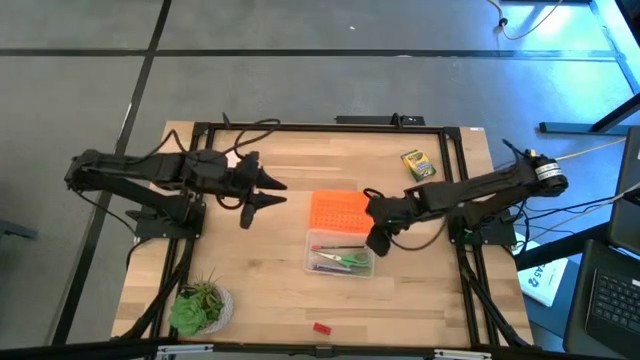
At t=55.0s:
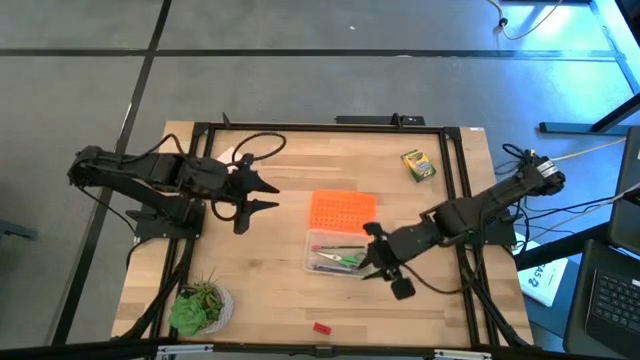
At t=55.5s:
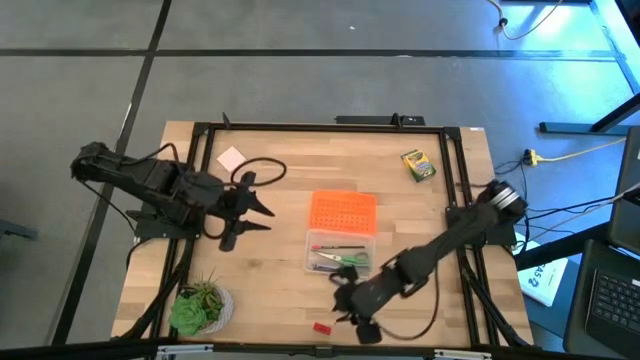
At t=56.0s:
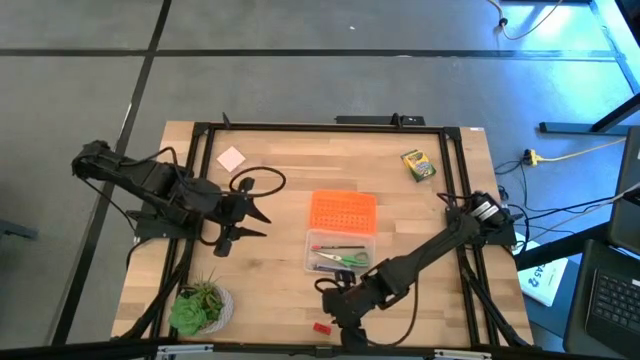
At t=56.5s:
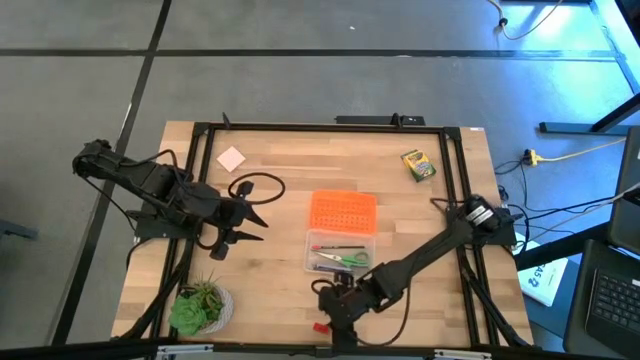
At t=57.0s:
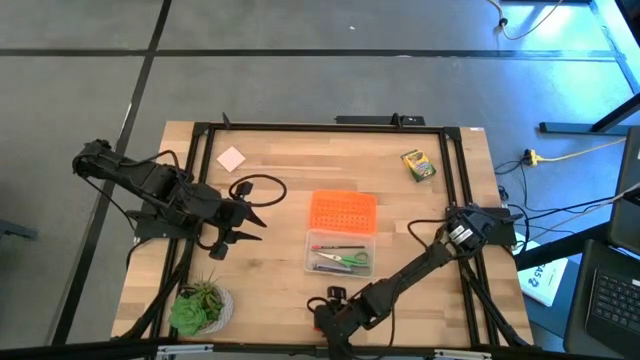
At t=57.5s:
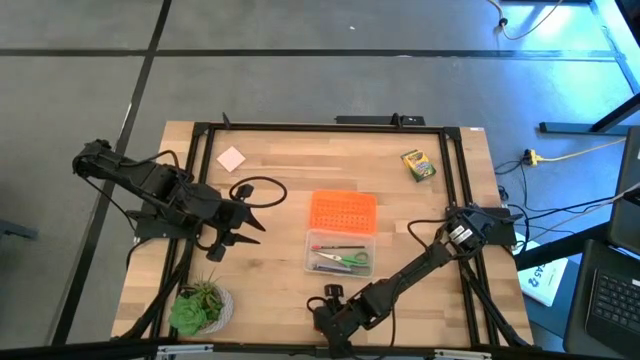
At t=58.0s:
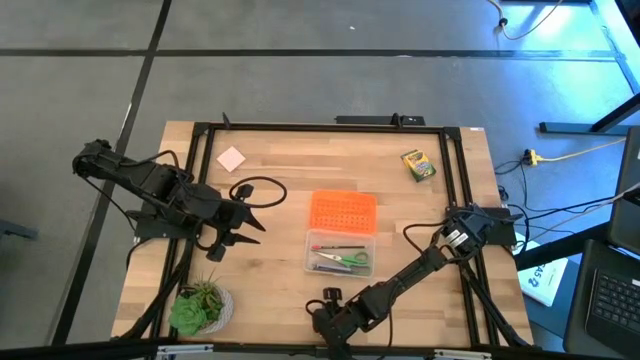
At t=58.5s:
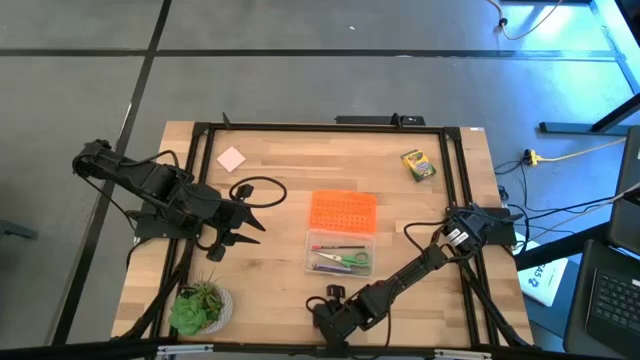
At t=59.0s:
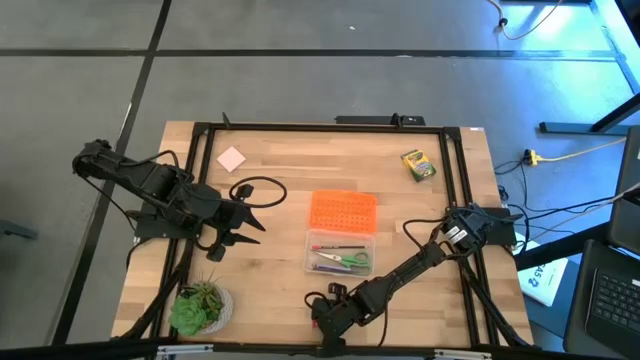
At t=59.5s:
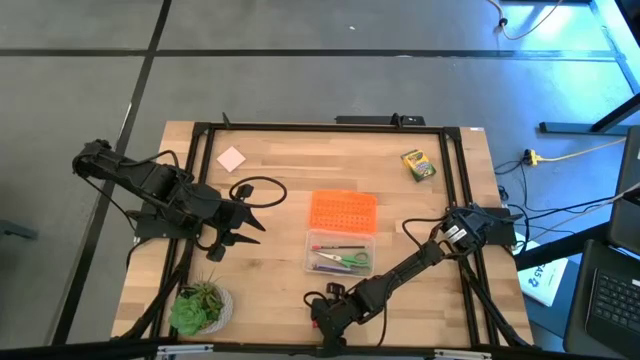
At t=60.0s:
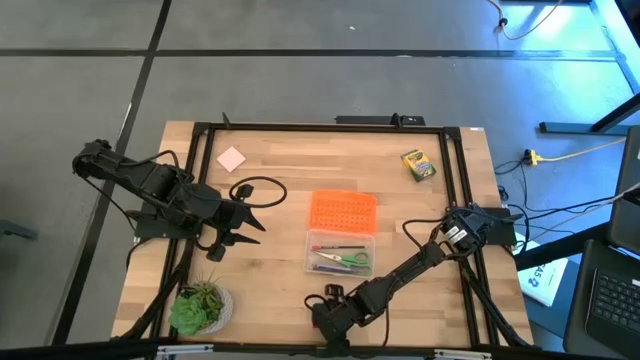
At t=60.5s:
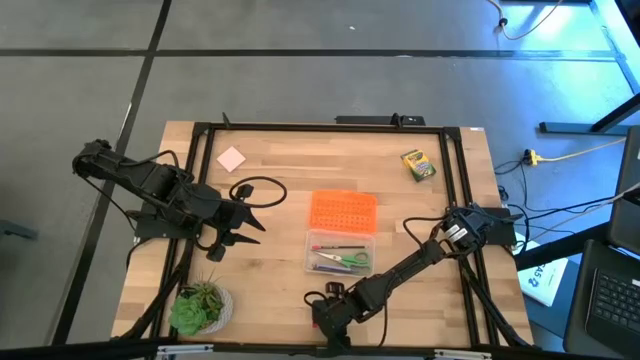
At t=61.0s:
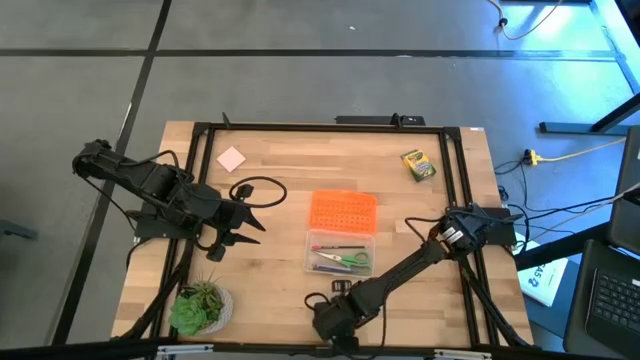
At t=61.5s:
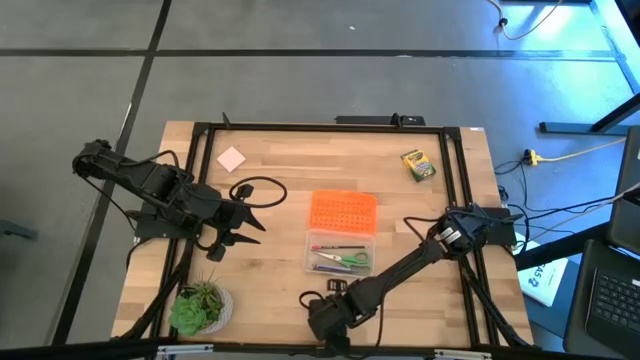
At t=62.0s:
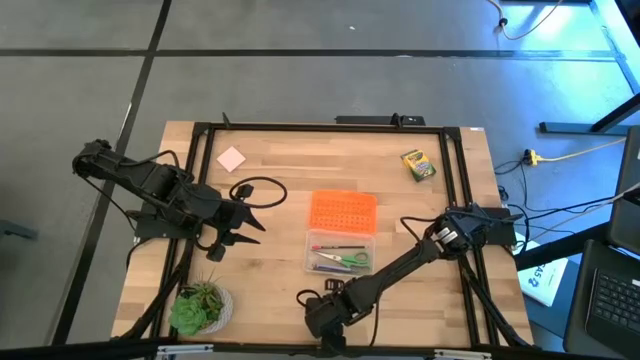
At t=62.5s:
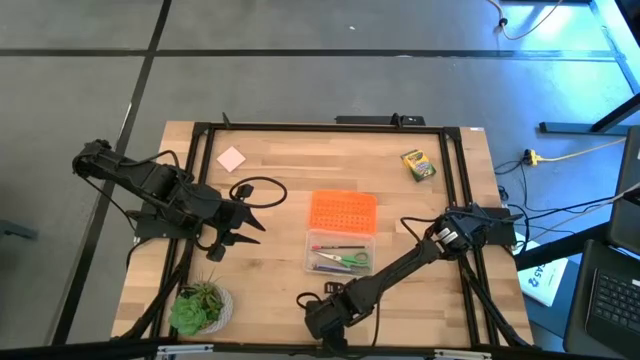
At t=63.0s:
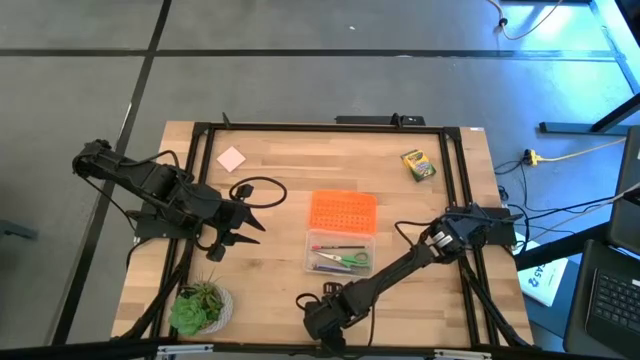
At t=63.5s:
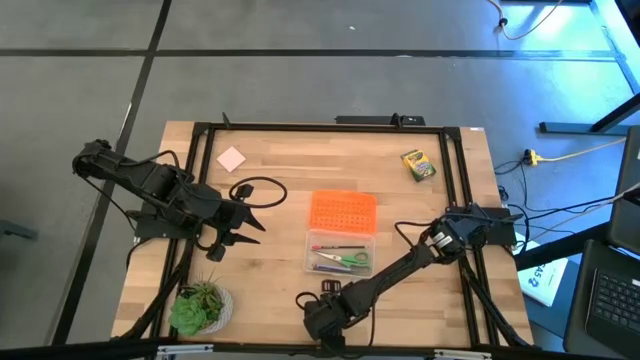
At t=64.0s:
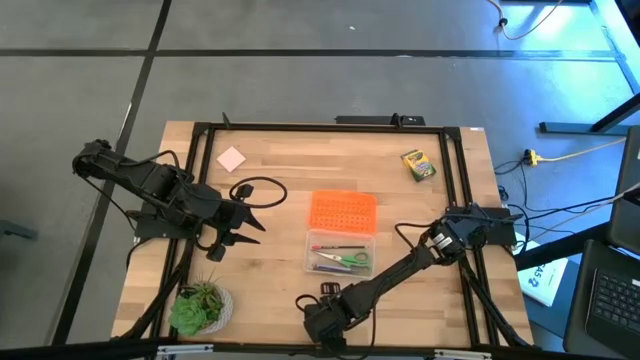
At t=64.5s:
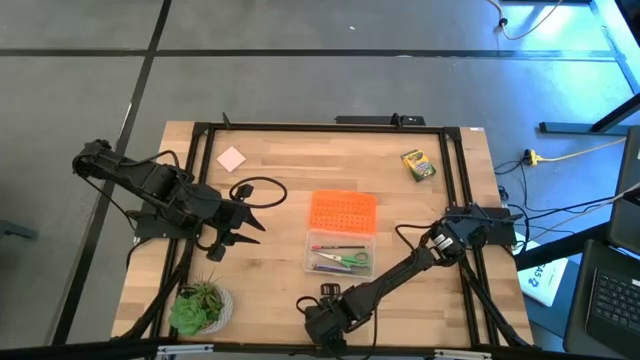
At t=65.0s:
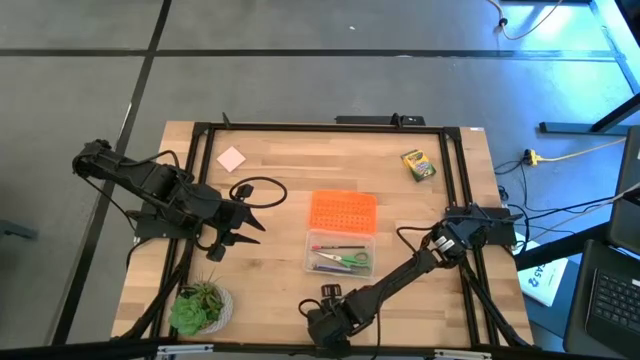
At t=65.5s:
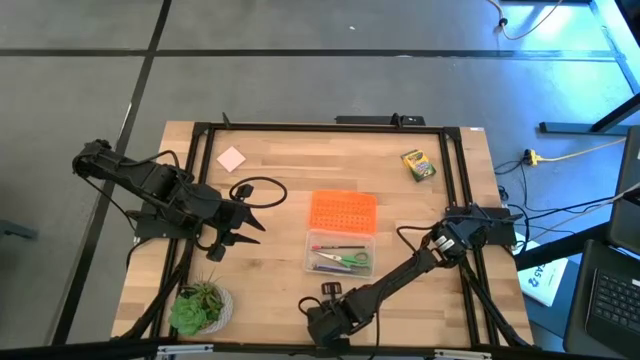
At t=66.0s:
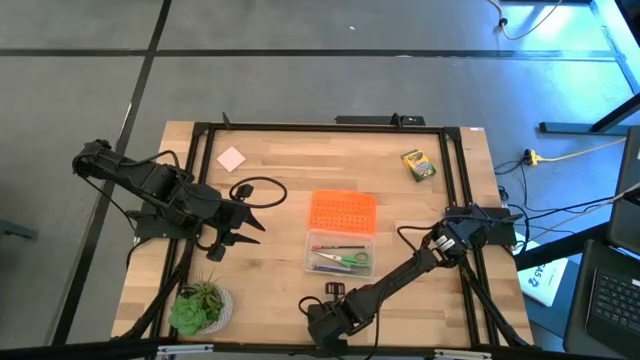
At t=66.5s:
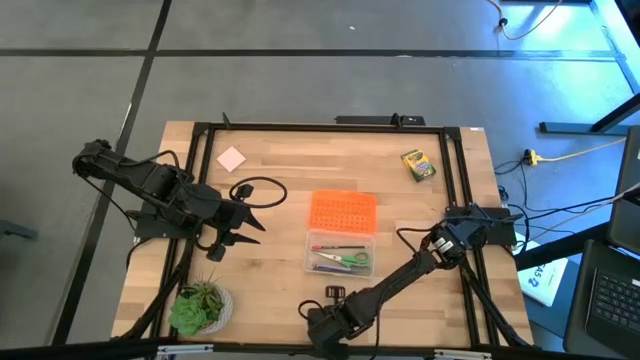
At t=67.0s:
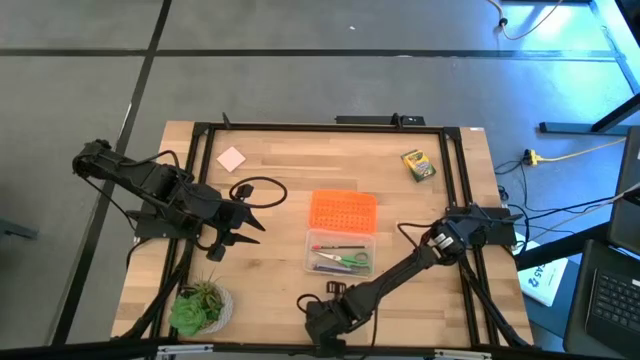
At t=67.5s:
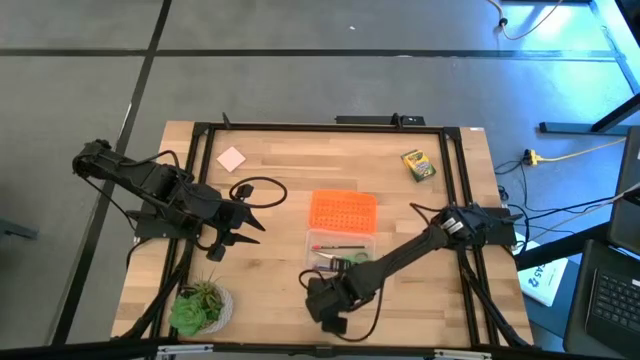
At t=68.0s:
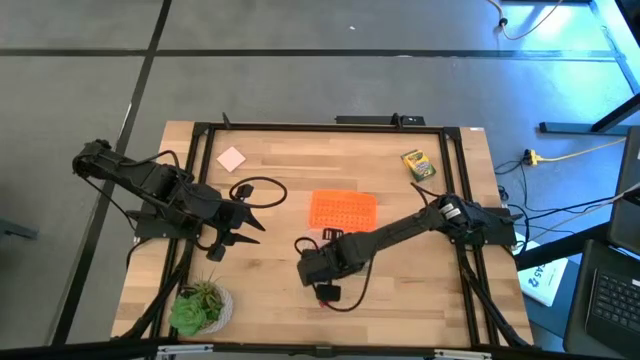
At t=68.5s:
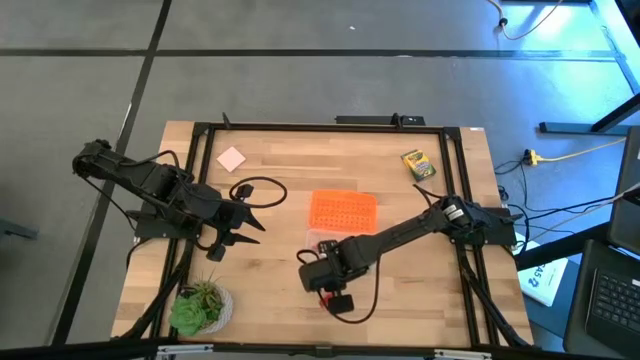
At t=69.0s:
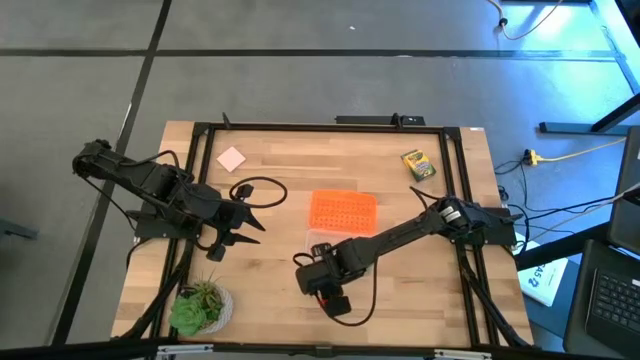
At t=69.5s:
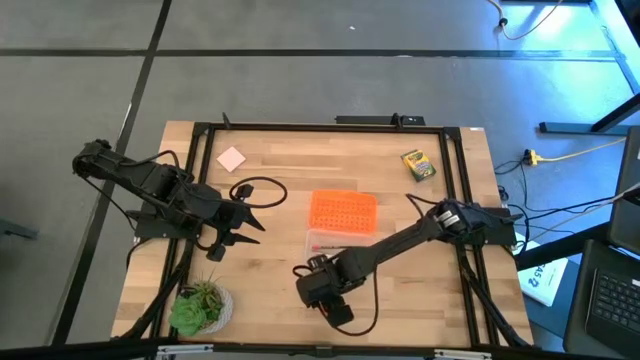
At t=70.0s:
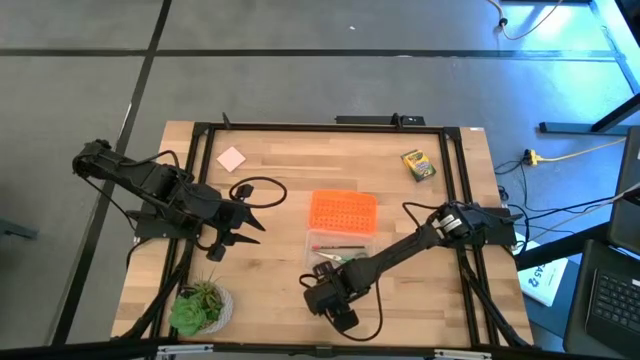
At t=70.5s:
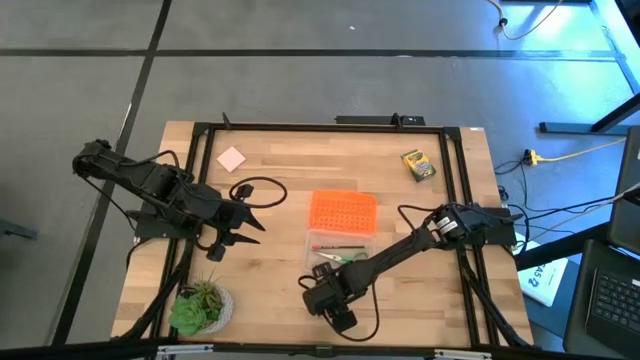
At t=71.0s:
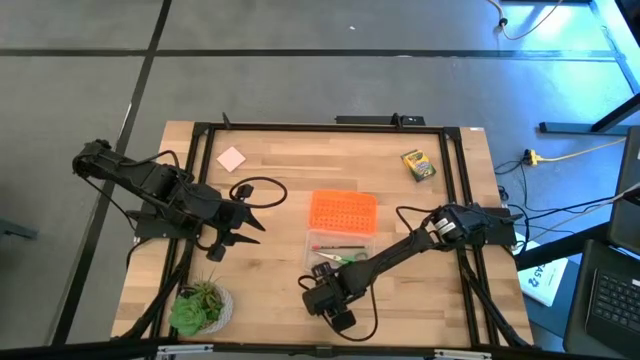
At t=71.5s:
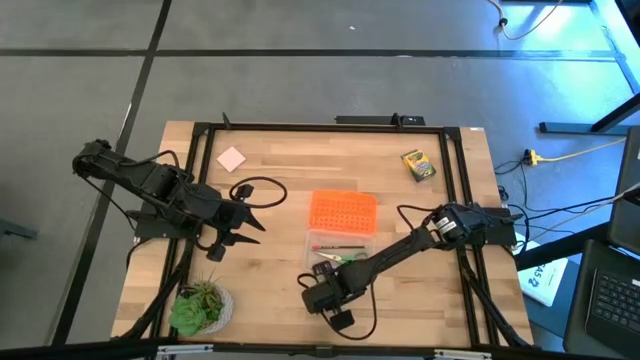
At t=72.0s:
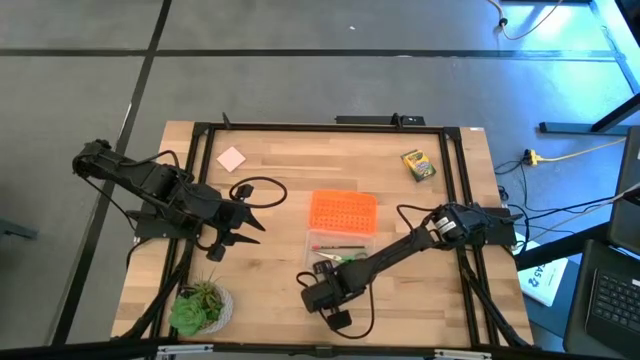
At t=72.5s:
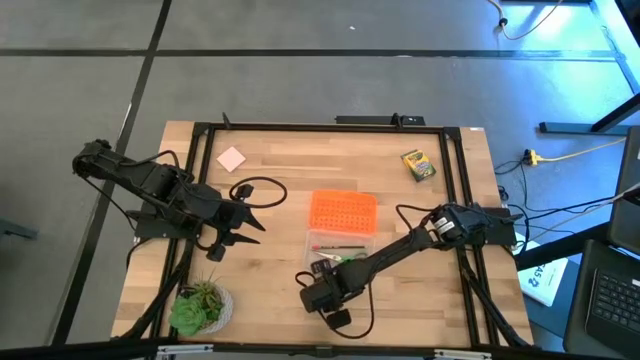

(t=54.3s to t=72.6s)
Task: Pack school essentials
Put the red eraser into the orange supply box

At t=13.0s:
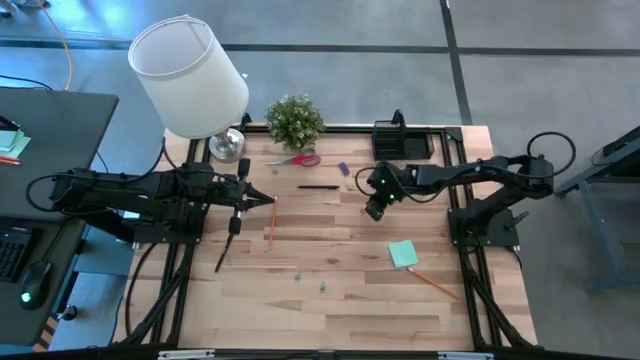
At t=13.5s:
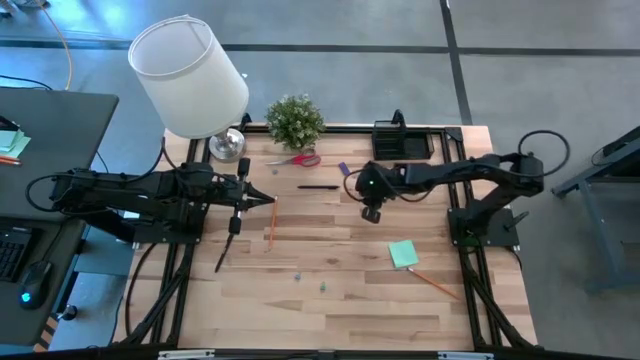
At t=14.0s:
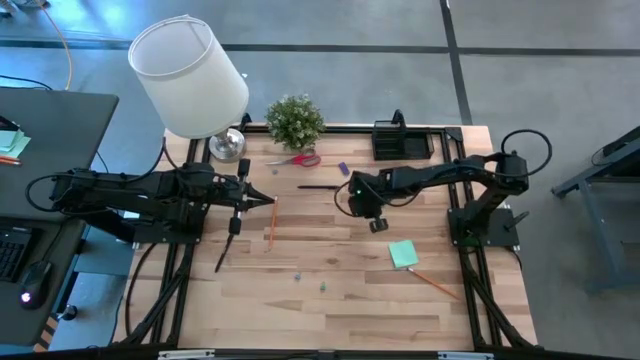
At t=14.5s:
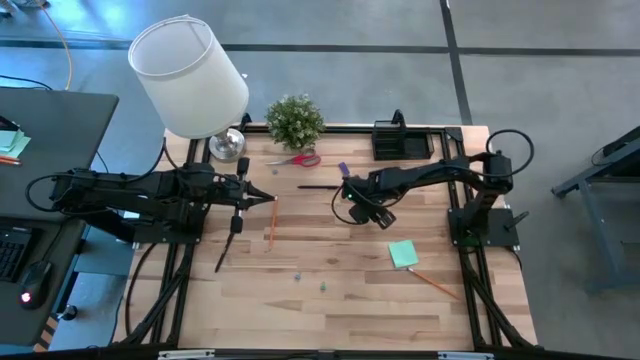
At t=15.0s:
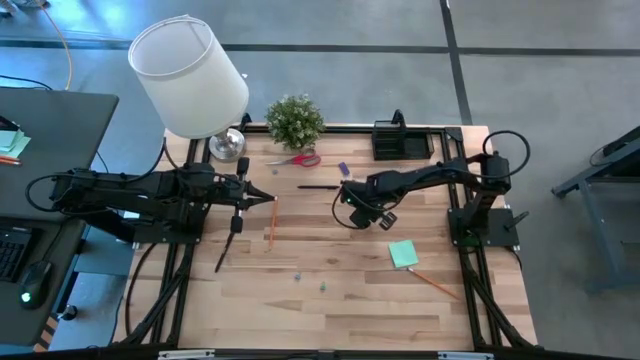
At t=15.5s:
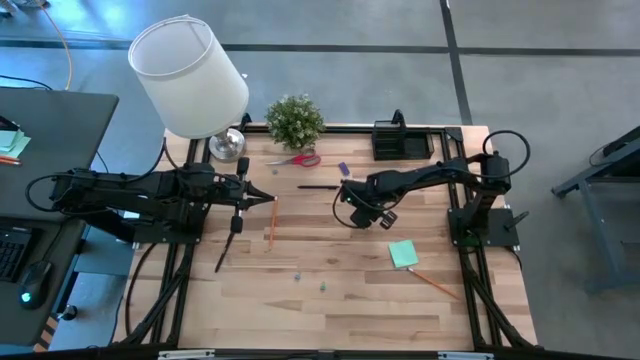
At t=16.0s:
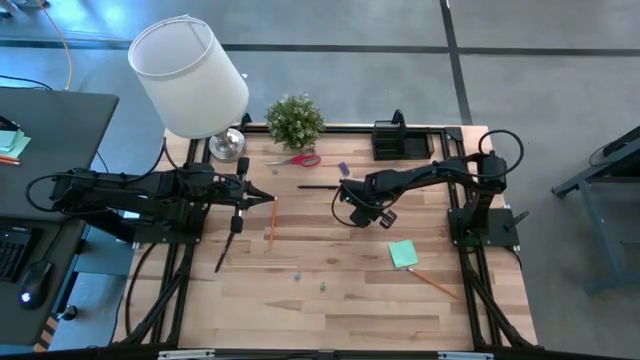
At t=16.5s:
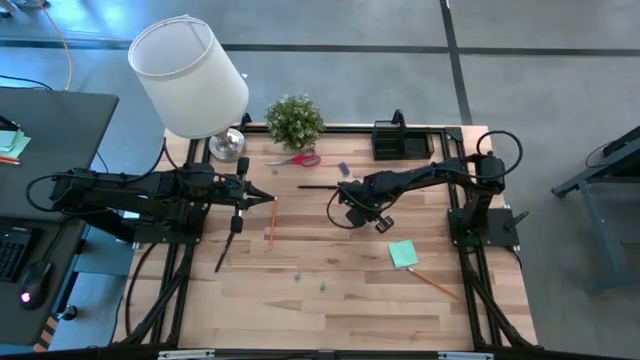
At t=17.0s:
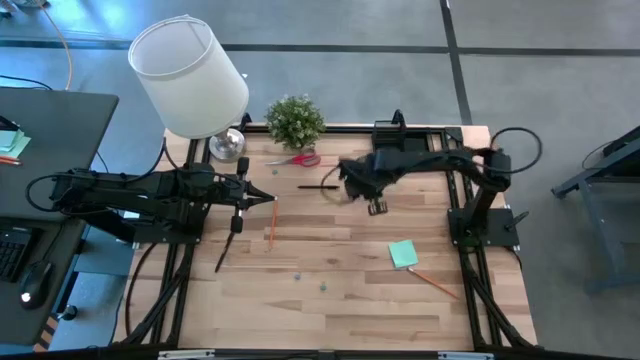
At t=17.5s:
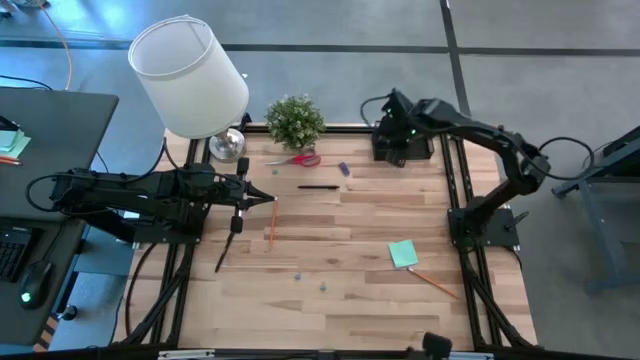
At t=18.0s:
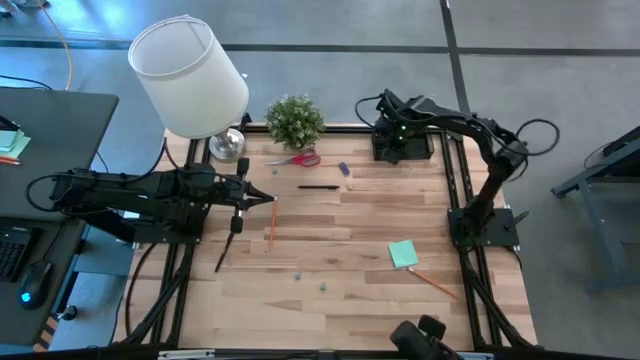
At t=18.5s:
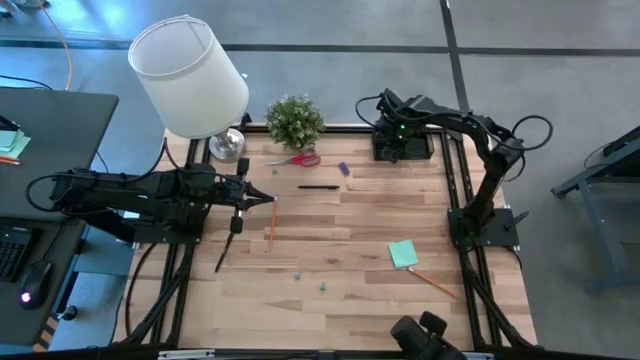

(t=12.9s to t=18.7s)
Task: Pick and place office supplies into organizer
Put the pink binder clip in the black desk organizer
